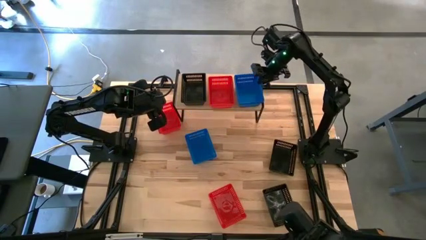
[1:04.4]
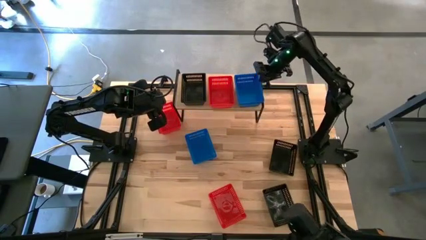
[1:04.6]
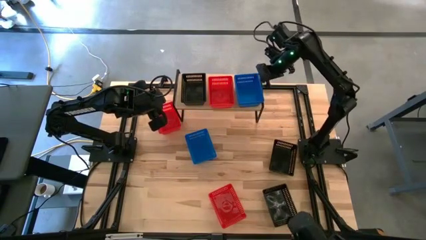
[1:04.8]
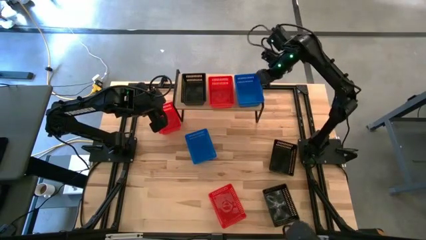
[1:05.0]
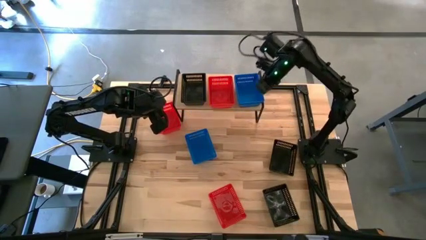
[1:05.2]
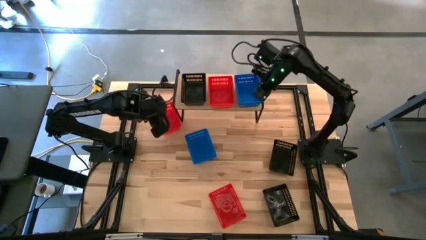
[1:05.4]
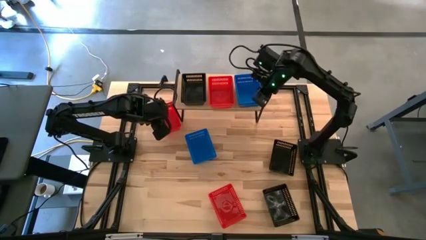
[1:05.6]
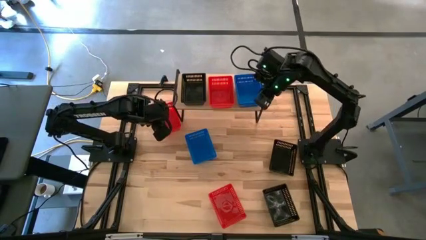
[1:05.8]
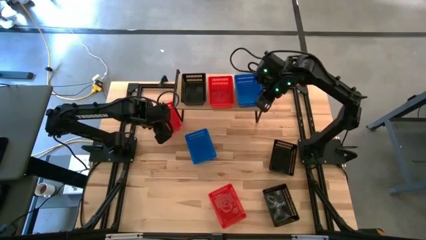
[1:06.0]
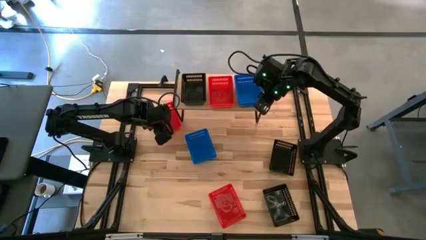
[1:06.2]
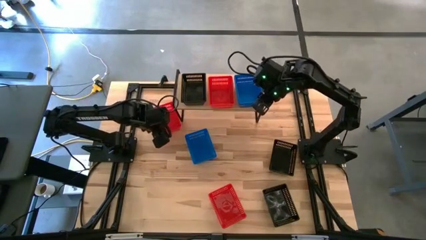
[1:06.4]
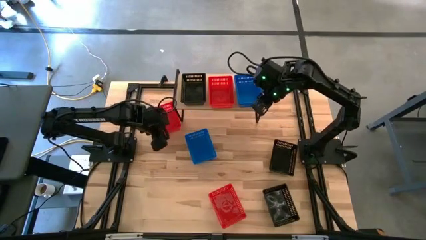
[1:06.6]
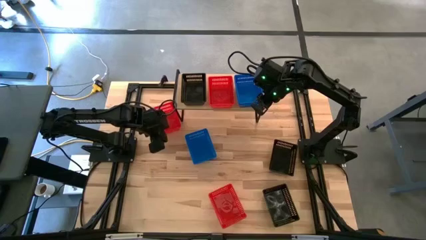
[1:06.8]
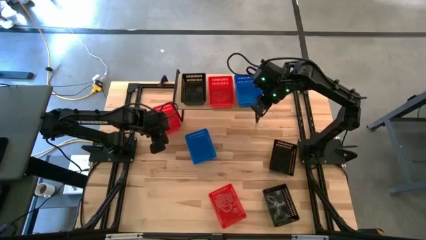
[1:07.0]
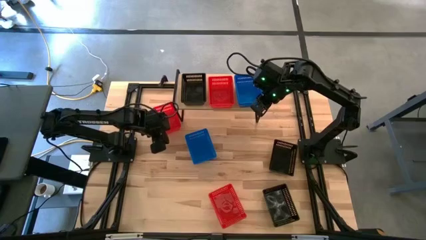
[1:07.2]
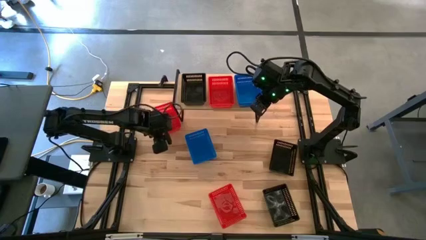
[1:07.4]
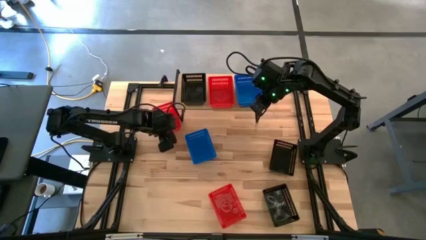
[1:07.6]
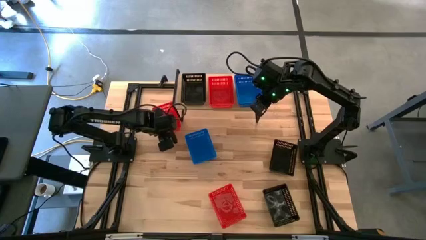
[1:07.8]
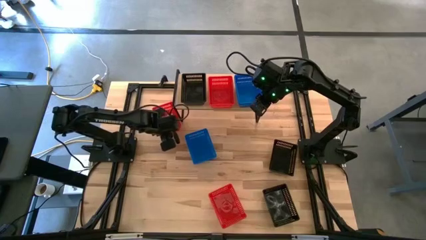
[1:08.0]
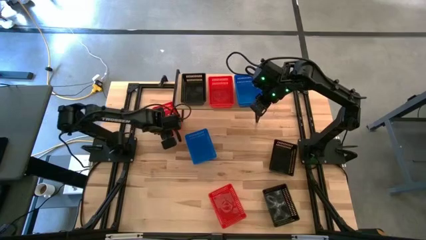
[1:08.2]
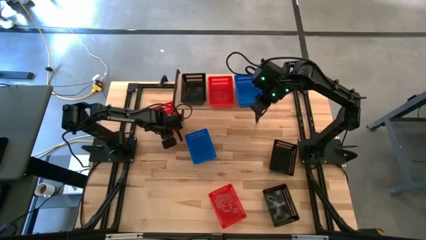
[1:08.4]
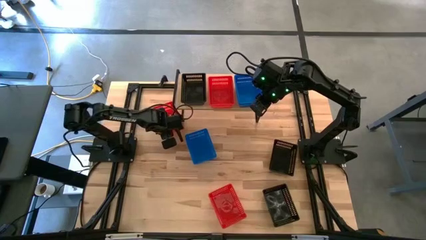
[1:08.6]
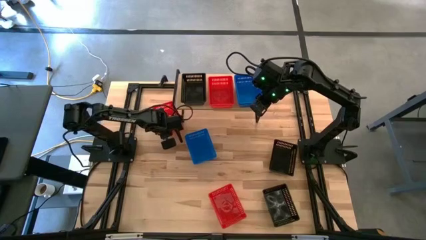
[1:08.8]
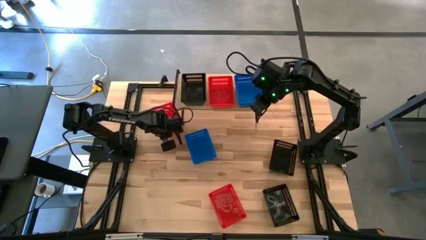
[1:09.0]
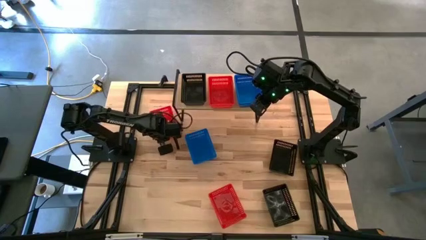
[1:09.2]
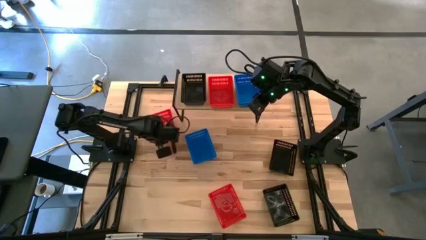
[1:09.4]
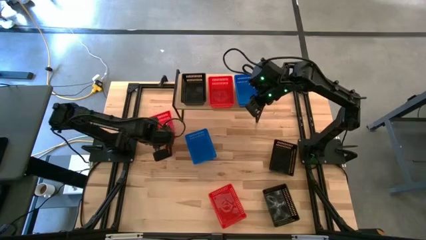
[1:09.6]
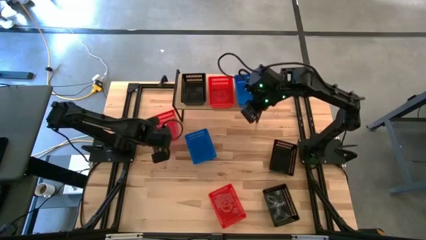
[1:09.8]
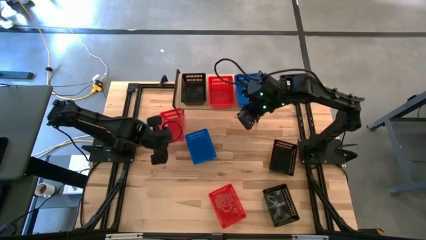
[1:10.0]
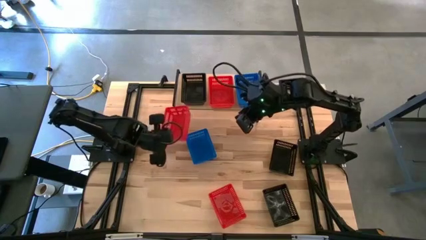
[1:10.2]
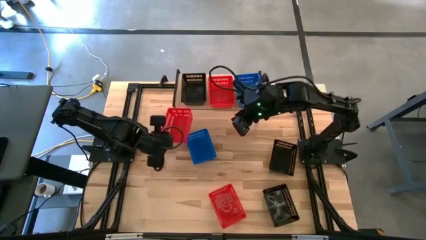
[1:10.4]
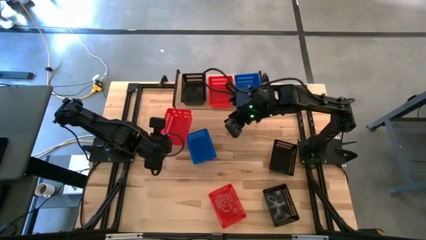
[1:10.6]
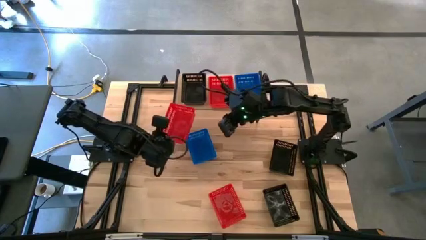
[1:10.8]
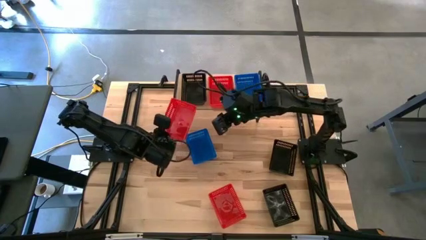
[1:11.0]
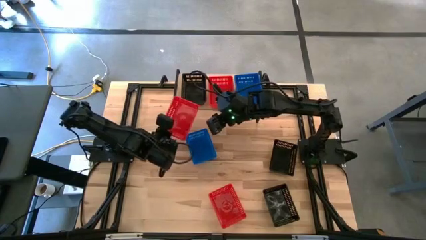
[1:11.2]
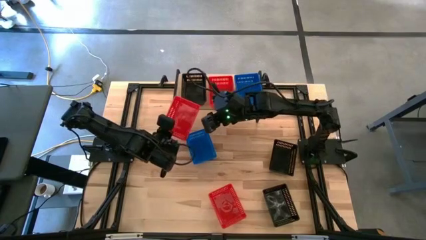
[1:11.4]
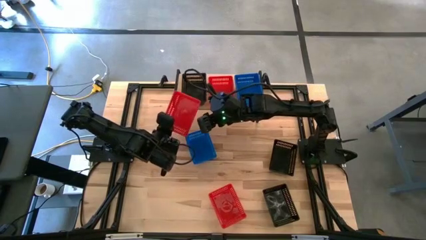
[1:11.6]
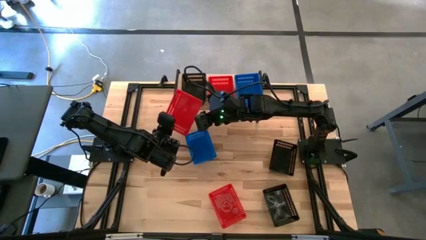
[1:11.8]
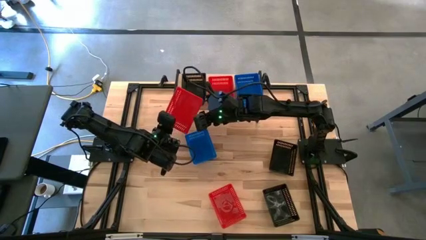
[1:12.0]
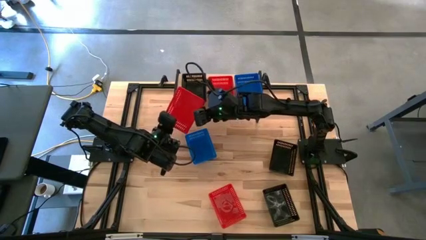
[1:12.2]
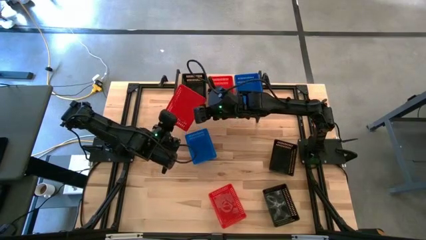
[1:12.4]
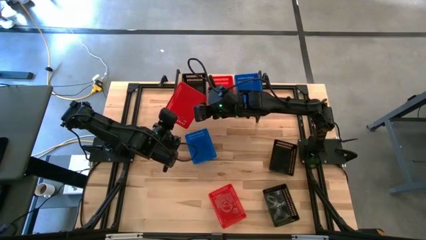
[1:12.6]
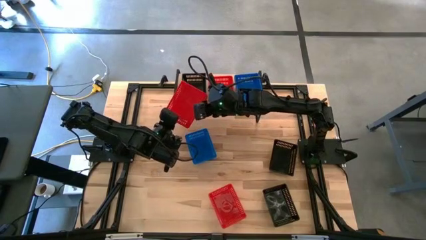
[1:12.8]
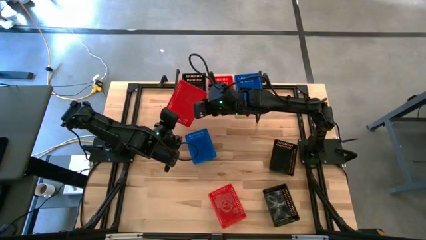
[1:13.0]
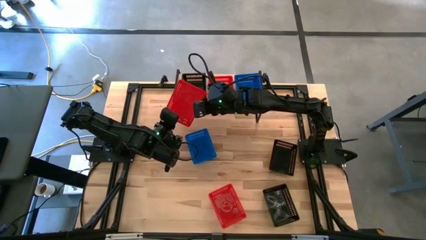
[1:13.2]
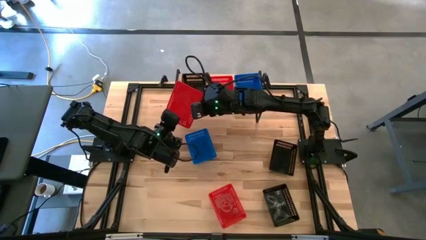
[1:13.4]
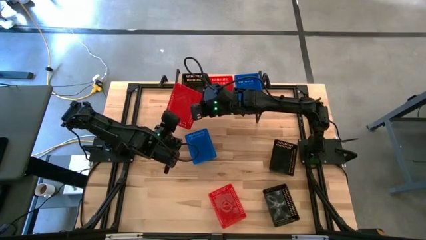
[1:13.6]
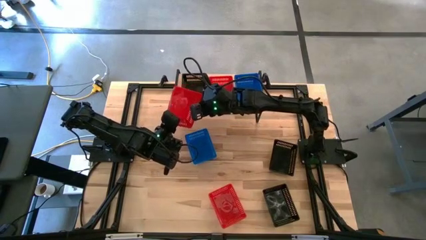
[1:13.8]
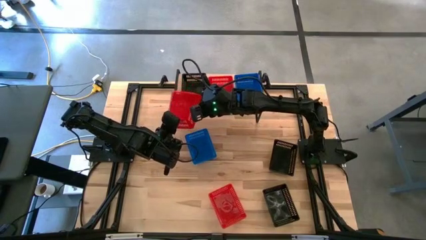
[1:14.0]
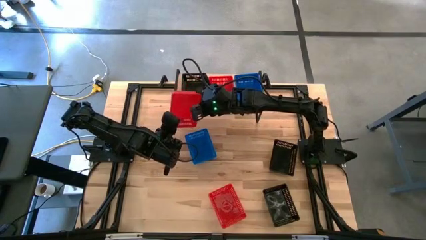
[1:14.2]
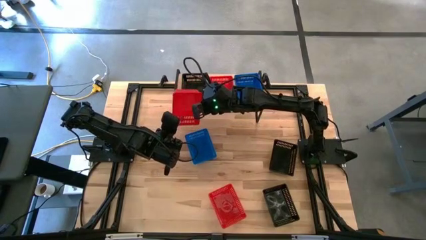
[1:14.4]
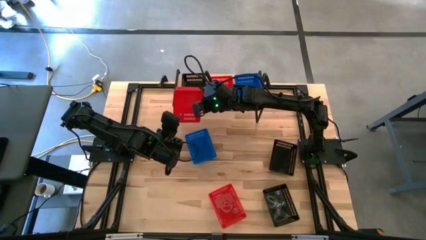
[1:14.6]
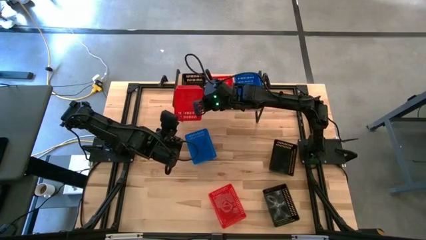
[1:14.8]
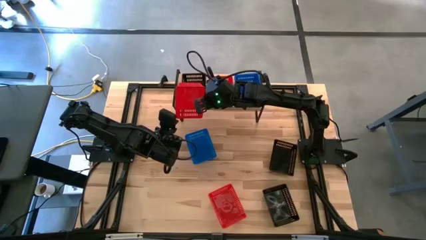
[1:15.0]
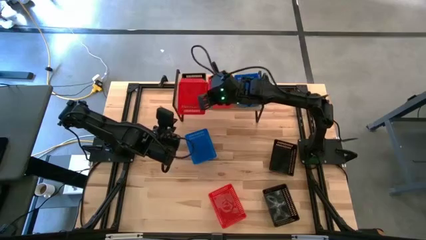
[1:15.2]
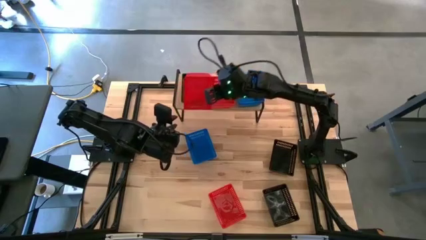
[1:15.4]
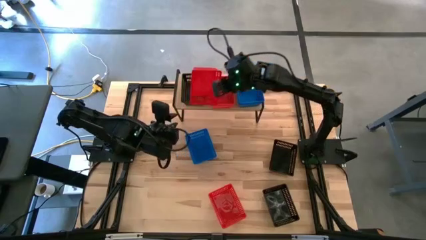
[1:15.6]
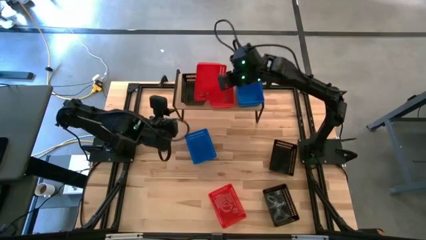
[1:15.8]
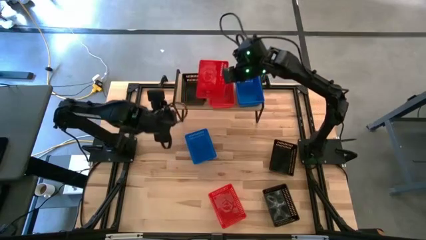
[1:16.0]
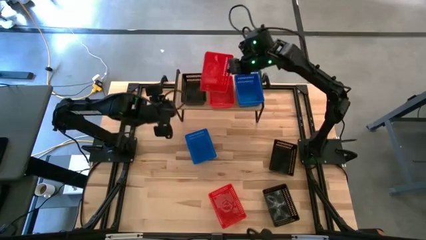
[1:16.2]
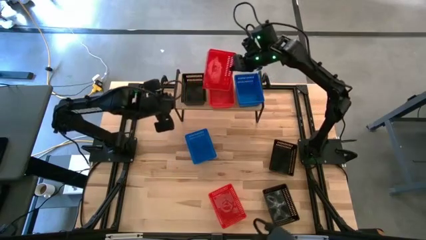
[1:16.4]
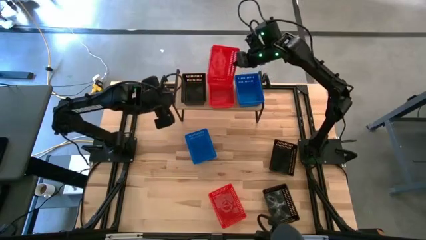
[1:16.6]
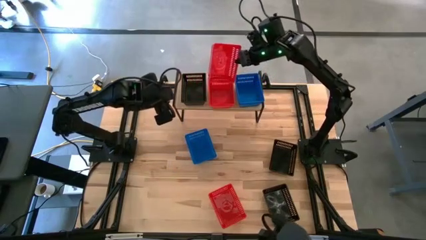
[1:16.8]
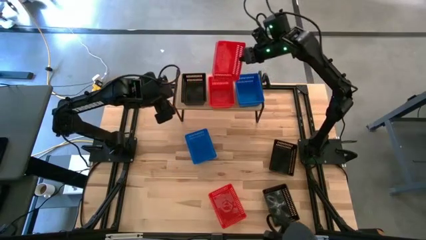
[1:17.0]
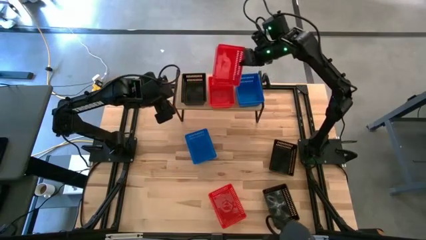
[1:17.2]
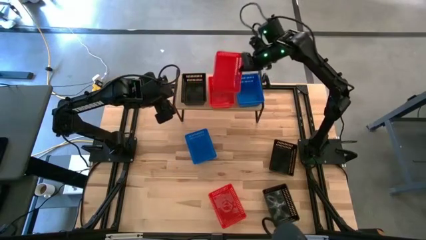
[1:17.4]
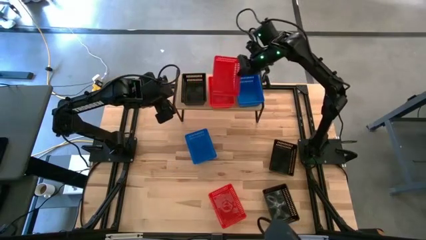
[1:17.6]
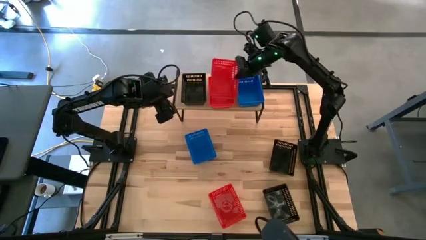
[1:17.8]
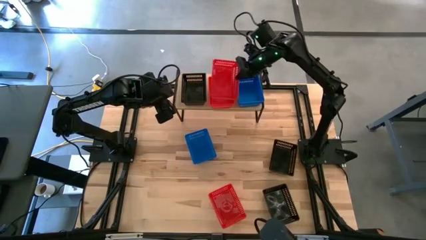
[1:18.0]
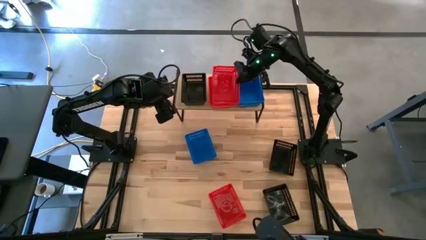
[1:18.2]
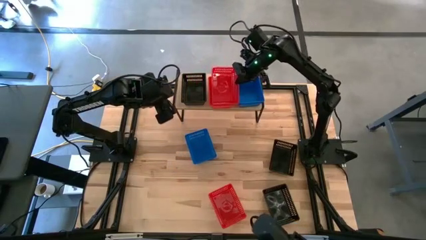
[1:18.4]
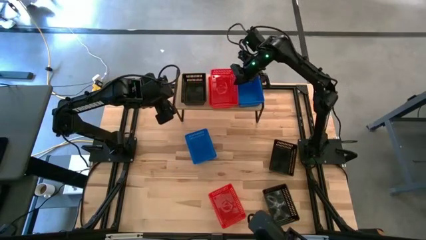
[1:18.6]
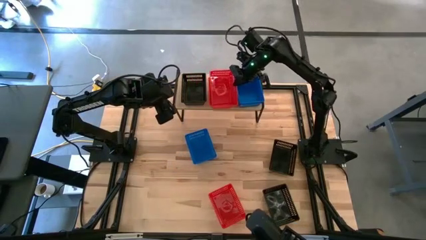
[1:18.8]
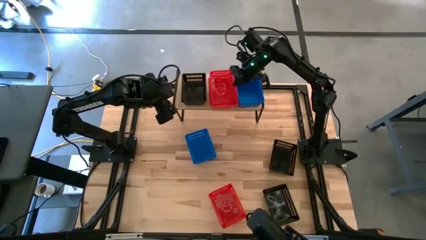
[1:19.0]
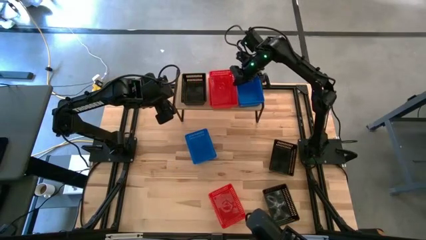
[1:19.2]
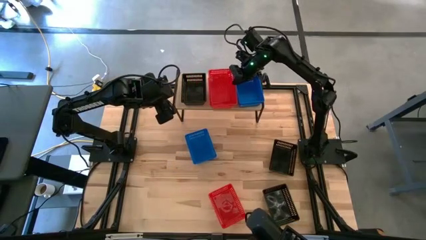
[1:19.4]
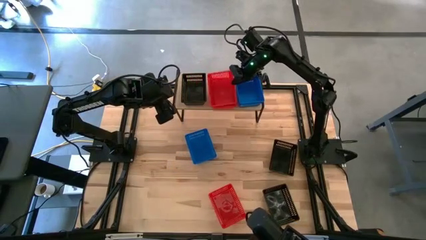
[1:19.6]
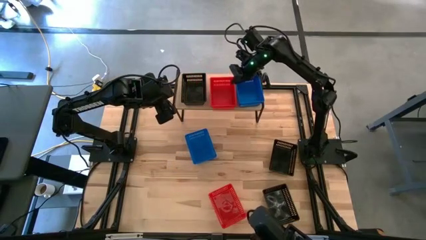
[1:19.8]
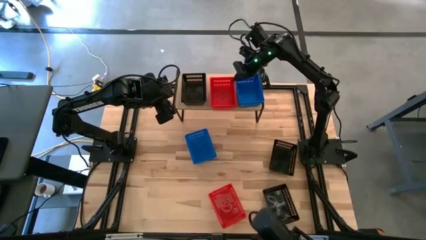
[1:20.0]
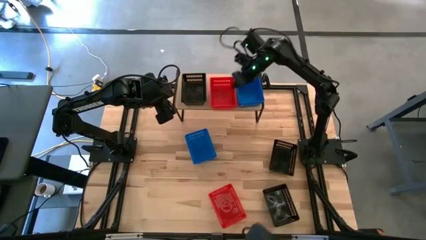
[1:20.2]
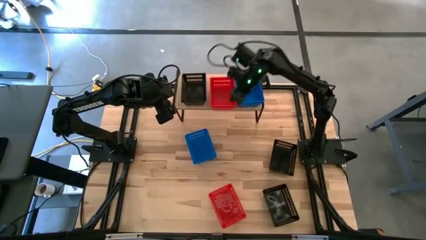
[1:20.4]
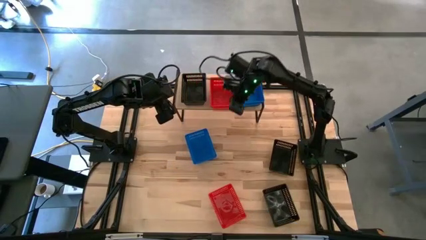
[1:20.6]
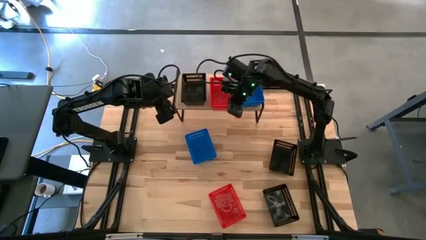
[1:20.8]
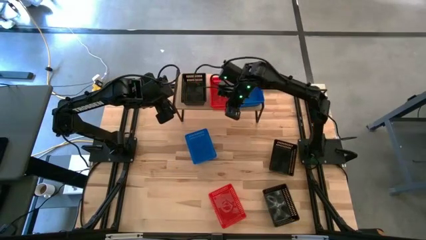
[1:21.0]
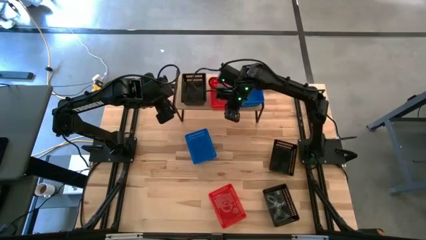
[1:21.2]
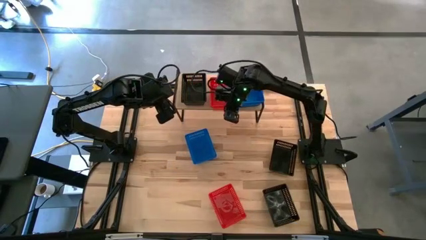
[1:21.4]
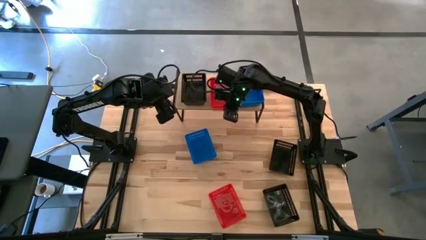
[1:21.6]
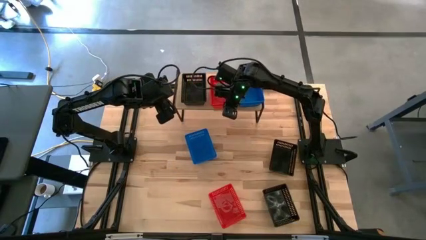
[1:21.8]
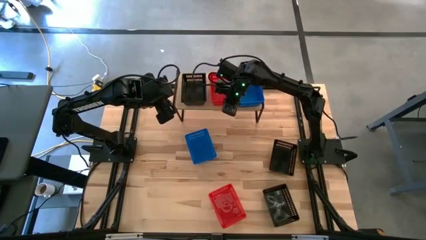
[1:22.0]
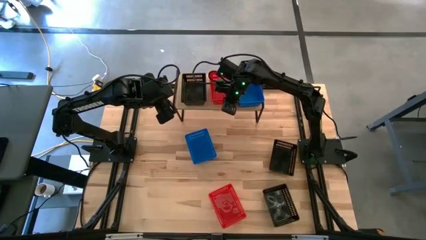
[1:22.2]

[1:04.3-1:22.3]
Task: Stack baskets on shelf by color
Stack the top red bin on top of the red bin on the shelf
